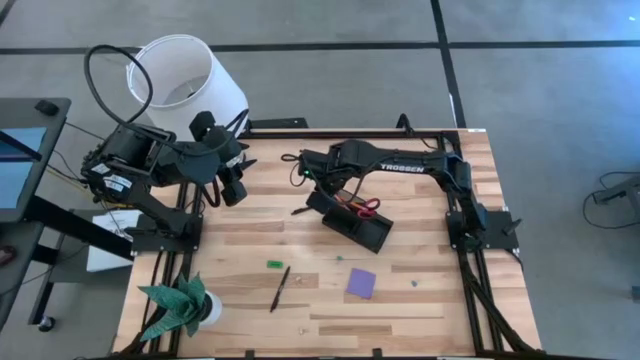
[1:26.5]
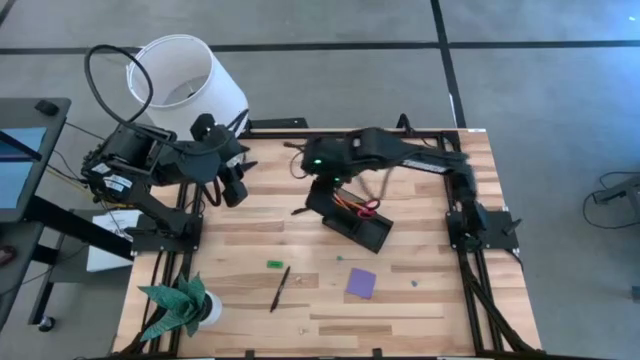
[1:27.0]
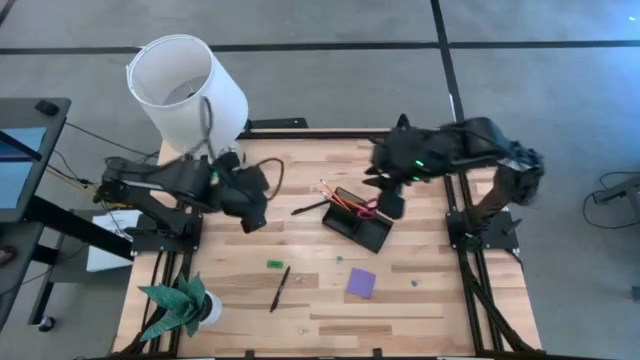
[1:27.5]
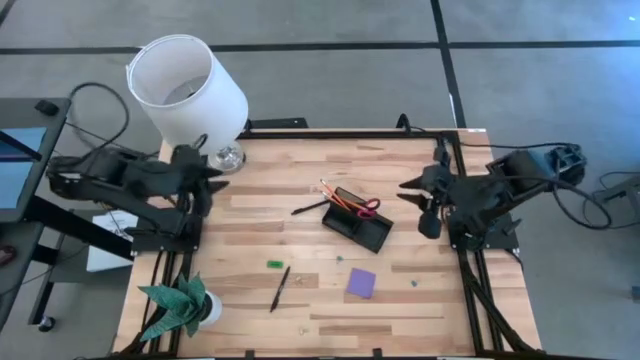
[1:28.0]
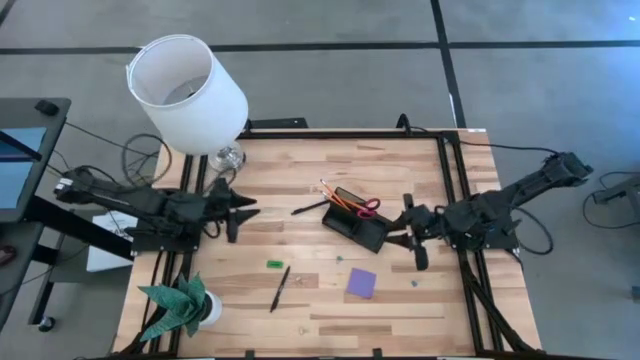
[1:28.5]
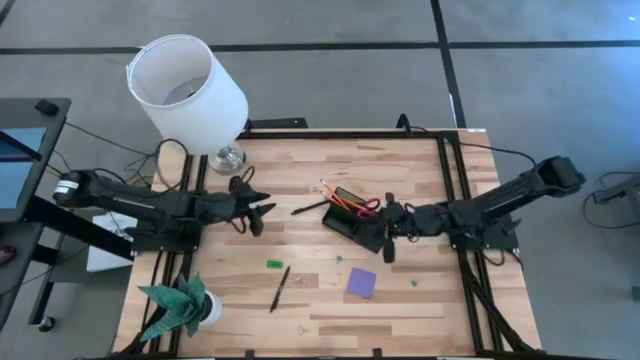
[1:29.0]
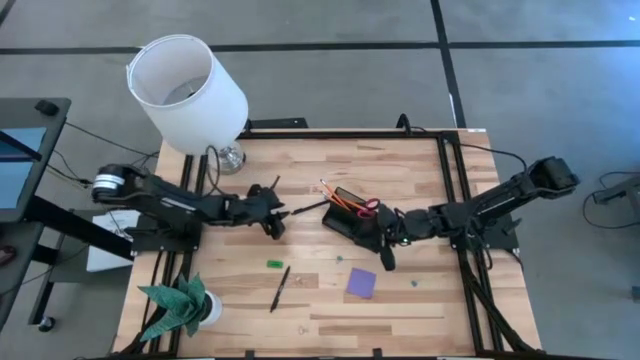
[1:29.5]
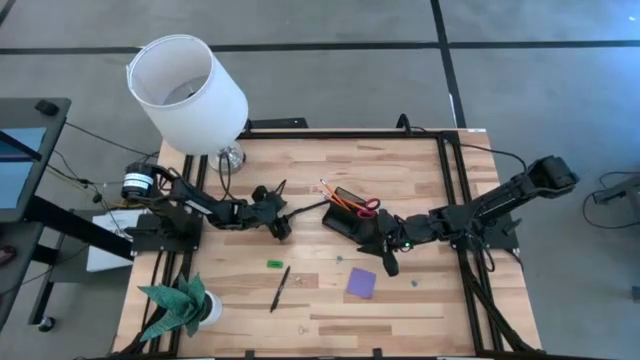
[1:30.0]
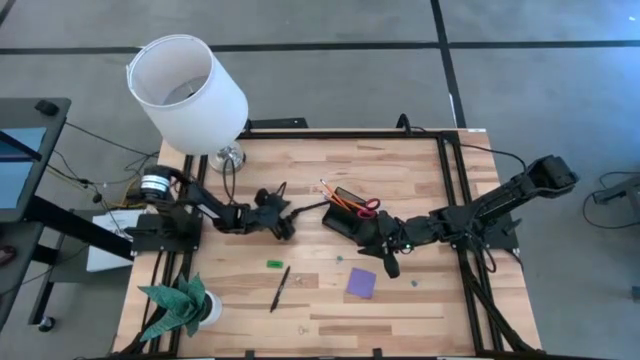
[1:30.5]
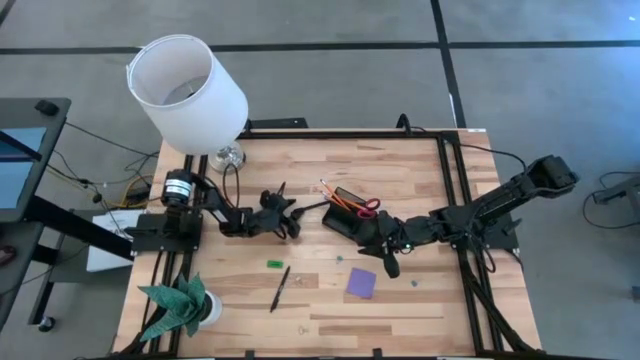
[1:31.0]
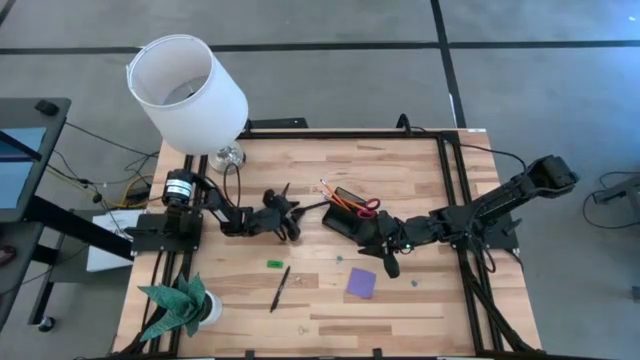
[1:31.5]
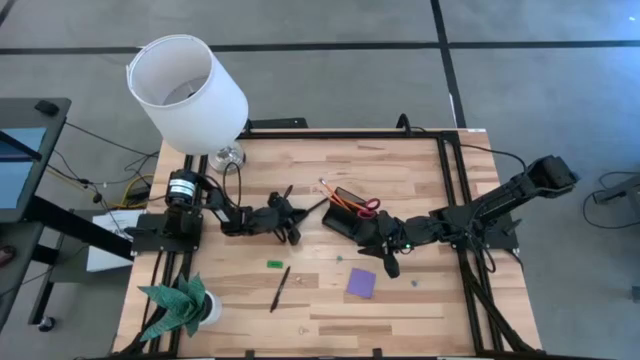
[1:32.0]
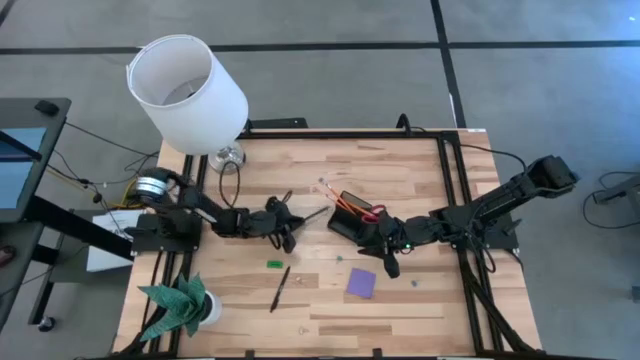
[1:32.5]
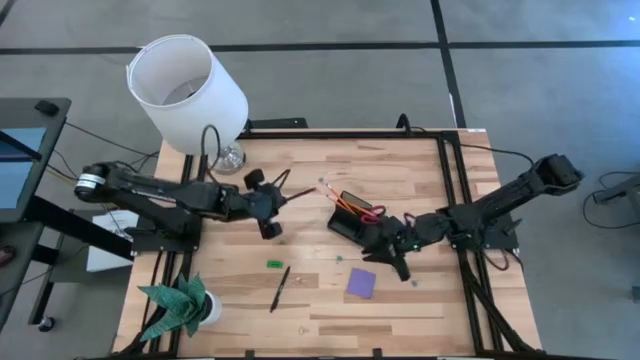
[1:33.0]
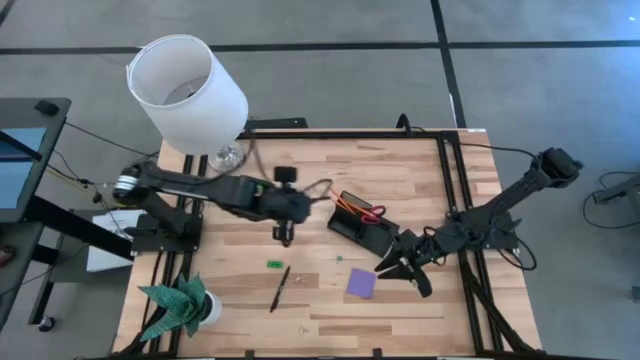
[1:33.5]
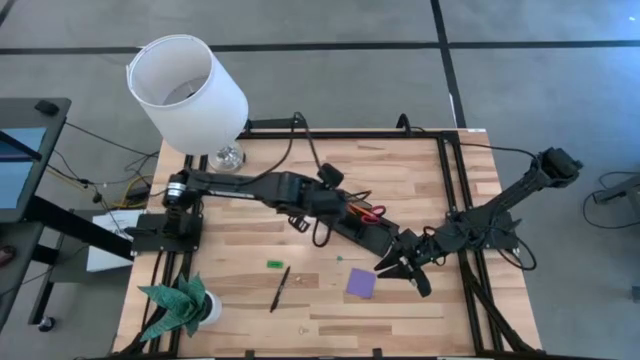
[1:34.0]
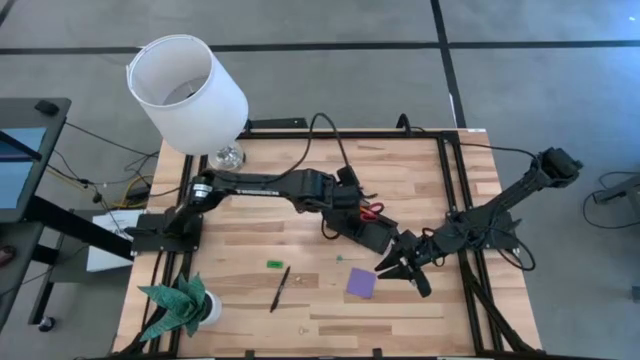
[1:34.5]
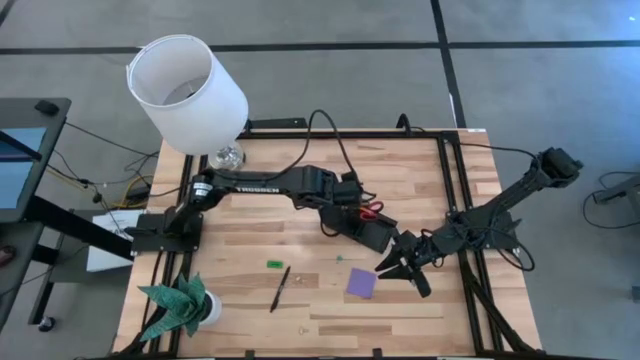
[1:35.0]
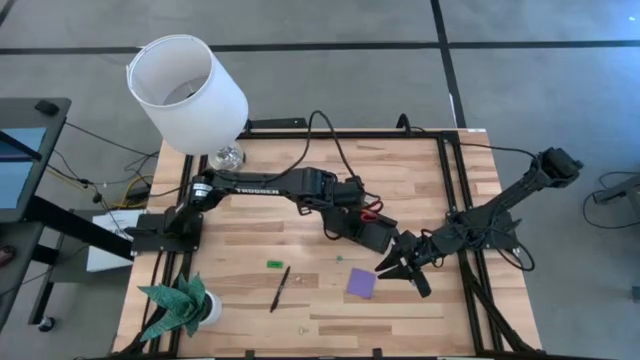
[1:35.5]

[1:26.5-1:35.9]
Task: Pick and place office supplies into organizer
Put the top black pen into the black desk organizer

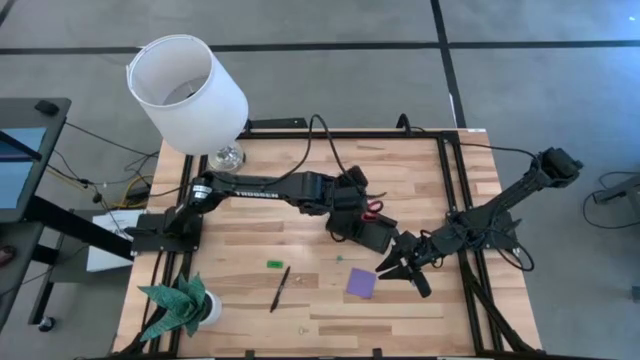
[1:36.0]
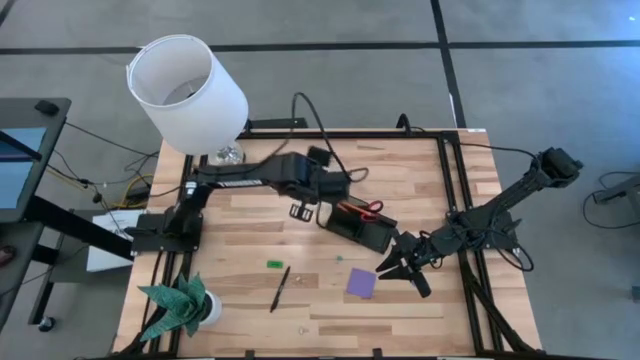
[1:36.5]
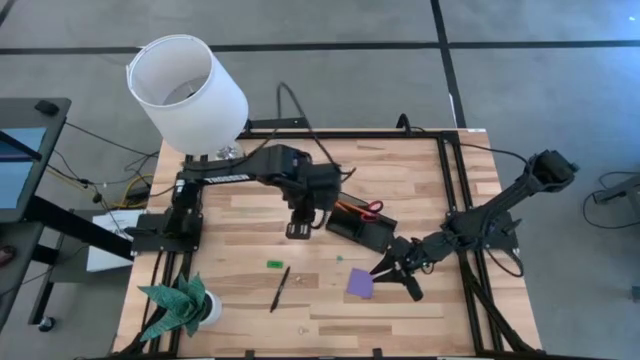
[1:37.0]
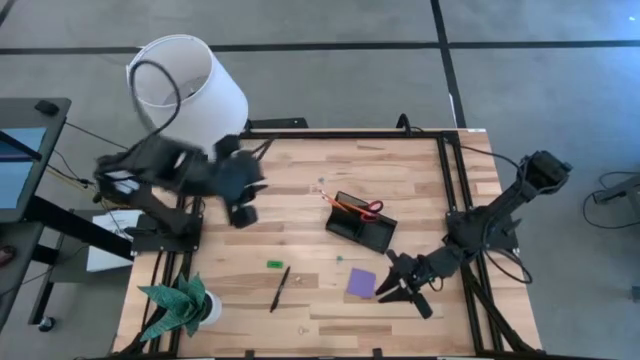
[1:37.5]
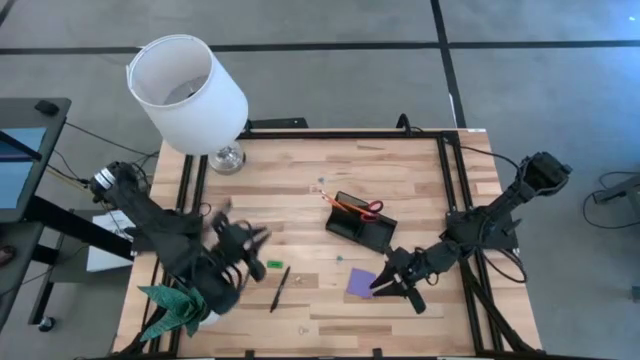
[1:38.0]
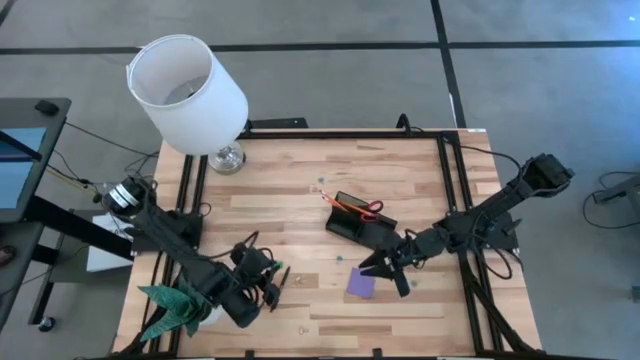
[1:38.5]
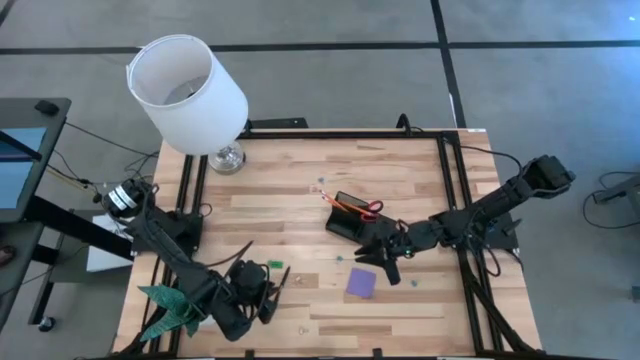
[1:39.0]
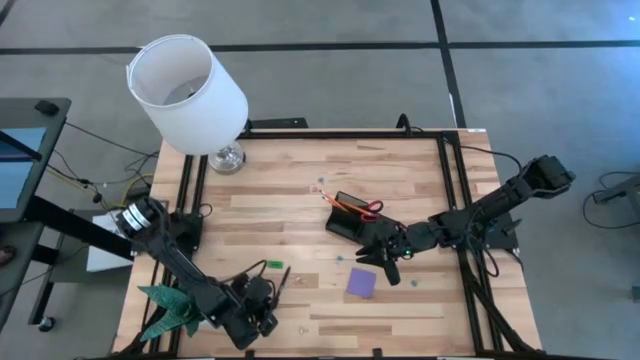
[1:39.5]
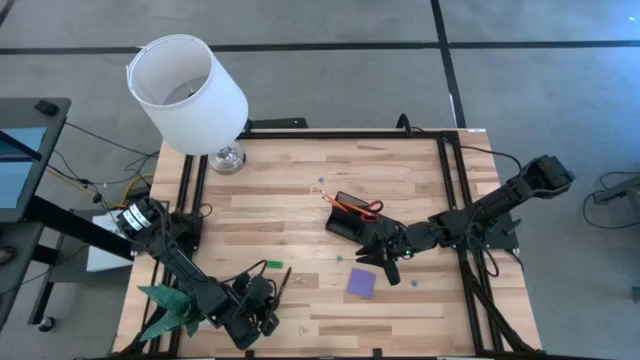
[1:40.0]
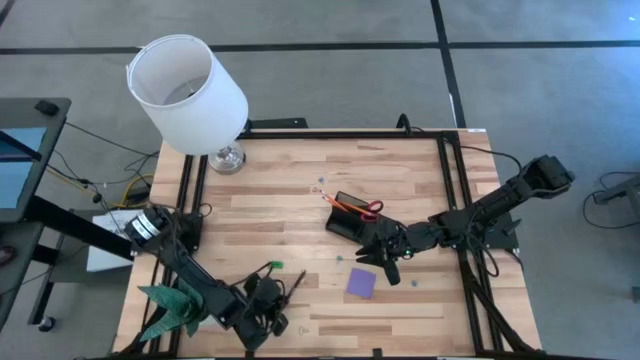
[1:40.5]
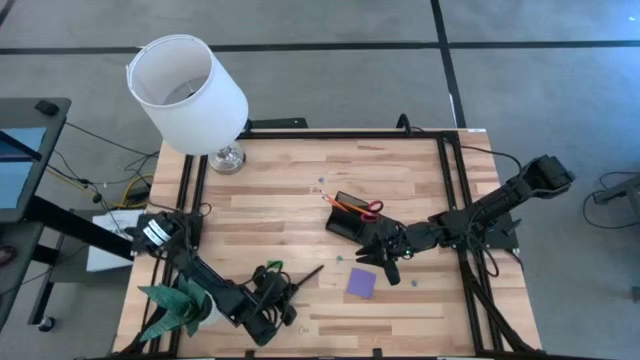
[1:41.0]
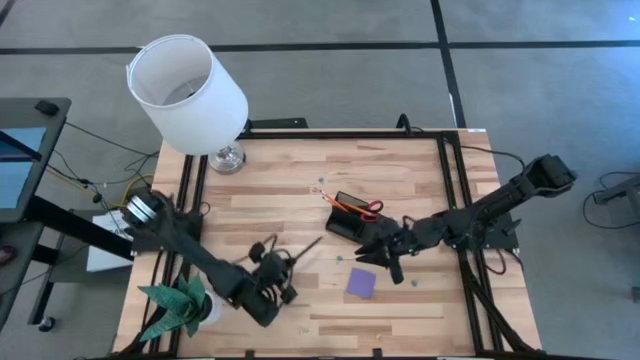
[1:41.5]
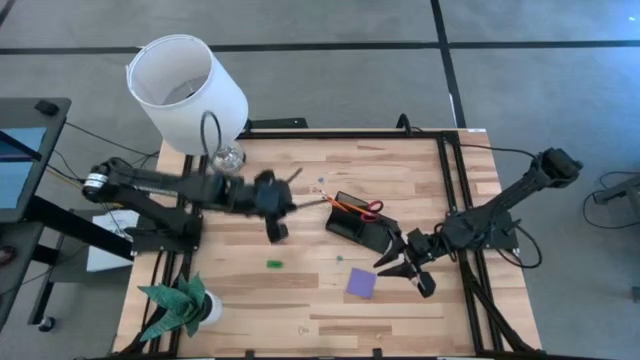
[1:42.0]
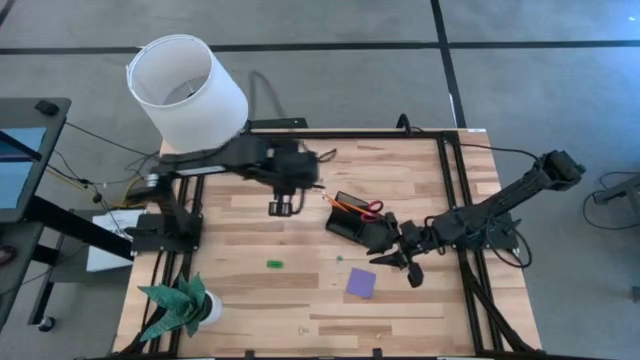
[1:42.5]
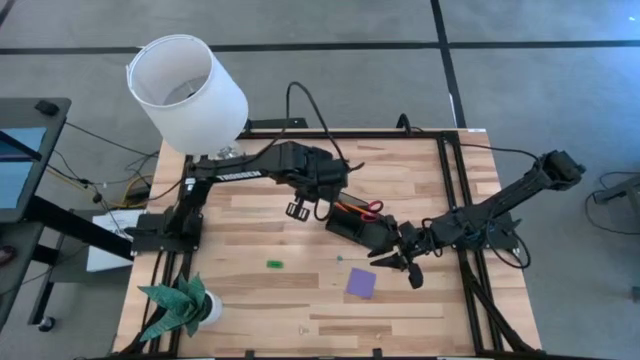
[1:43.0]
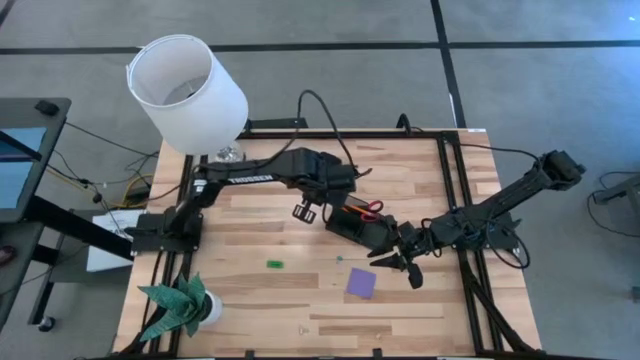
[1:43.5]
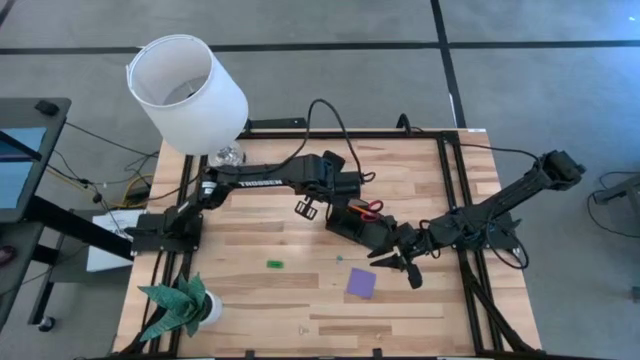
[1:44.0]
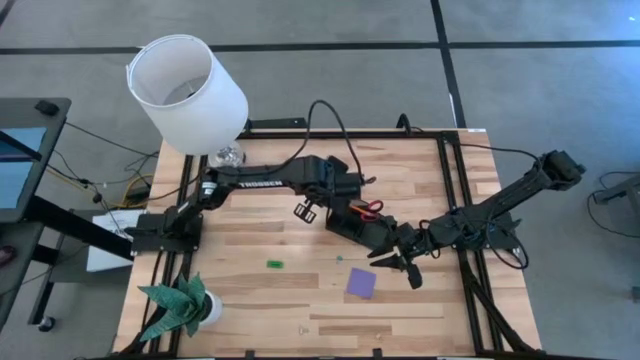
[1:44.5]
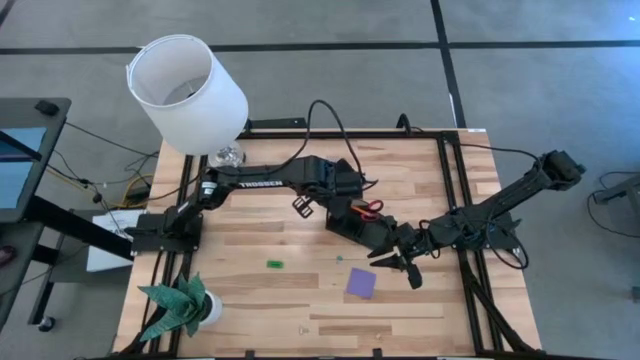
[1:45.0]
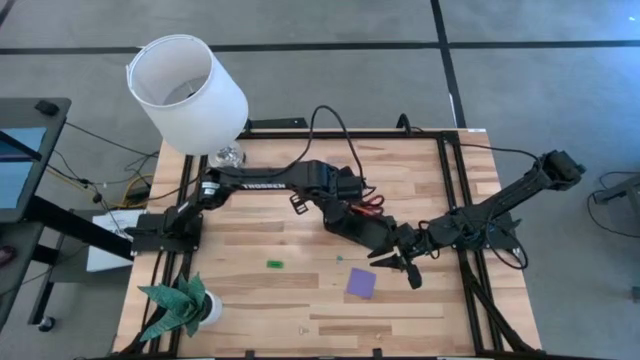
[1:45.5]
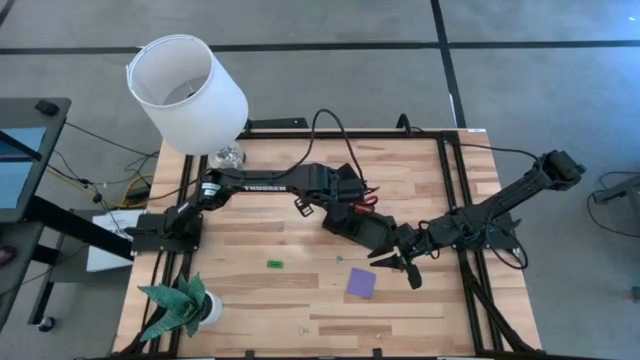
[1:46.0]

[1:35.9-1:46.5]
Put the black pen into the black desk organizer

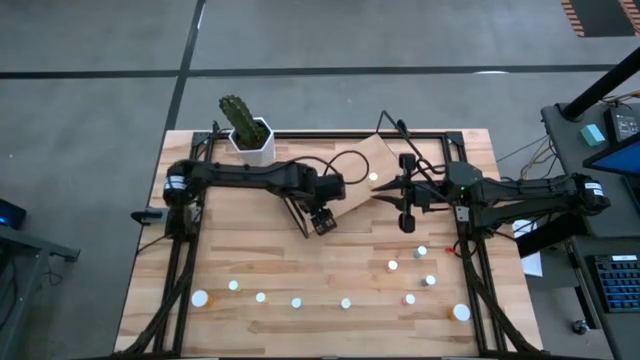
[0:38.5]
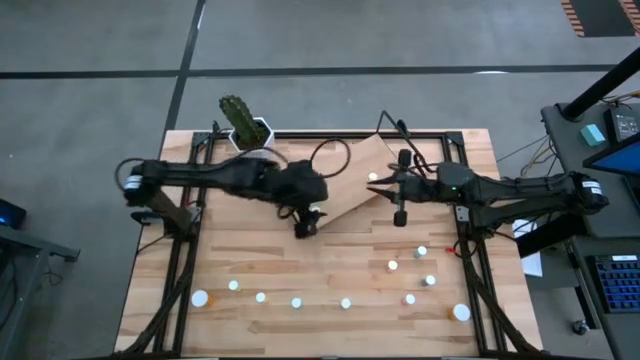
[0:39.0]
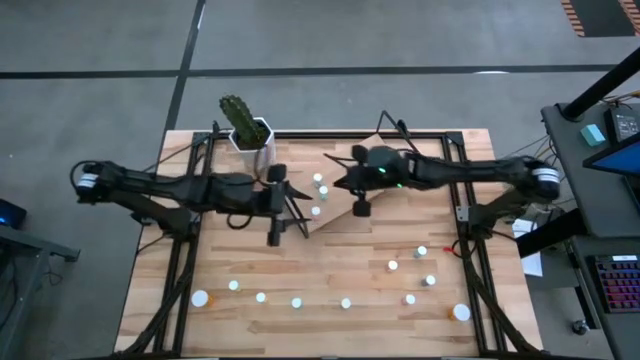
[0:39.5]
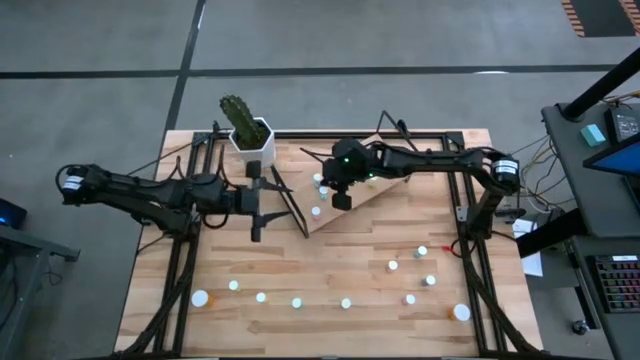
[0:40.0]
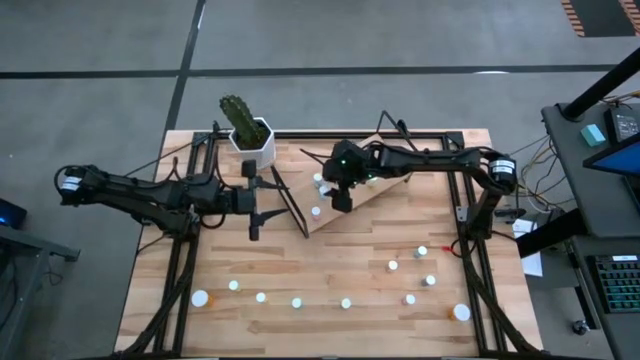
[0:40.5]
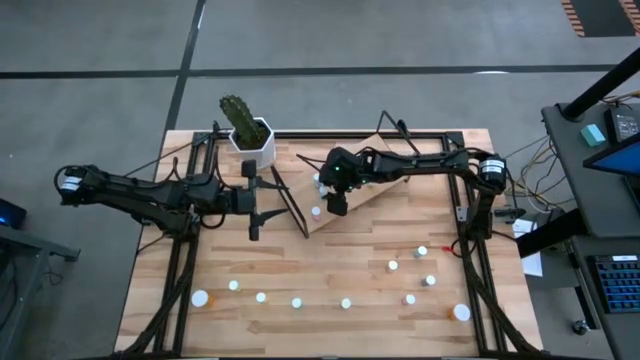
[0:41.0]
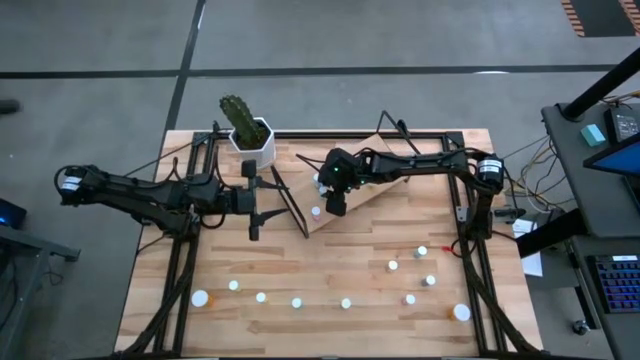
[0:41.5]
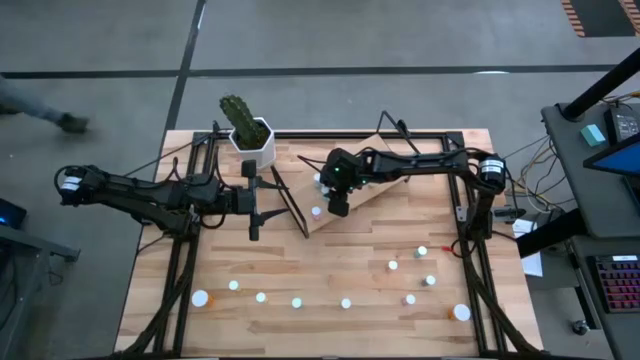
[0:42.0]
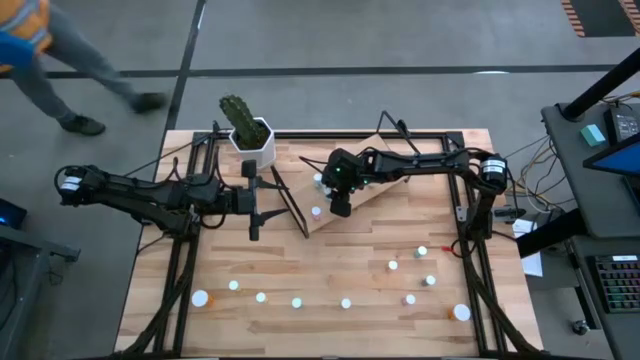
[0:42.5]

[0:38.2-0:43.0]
Task: Pick and place medicine bottles onto shelf by color
Adjust the green pill bottle on the shelf
